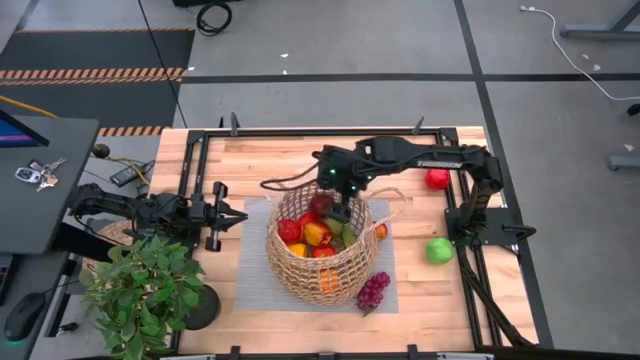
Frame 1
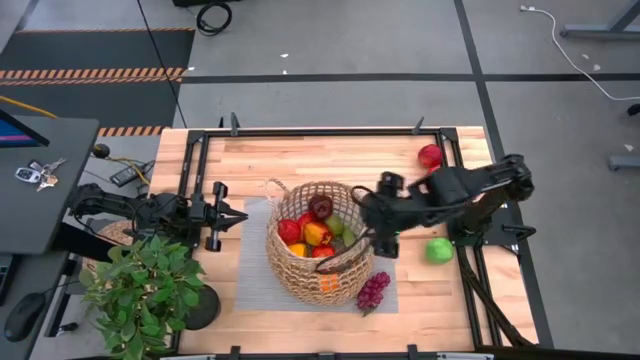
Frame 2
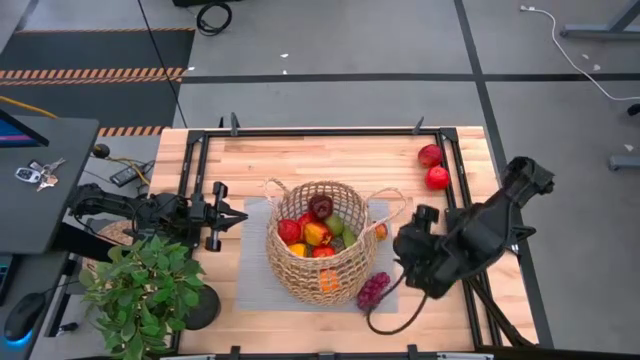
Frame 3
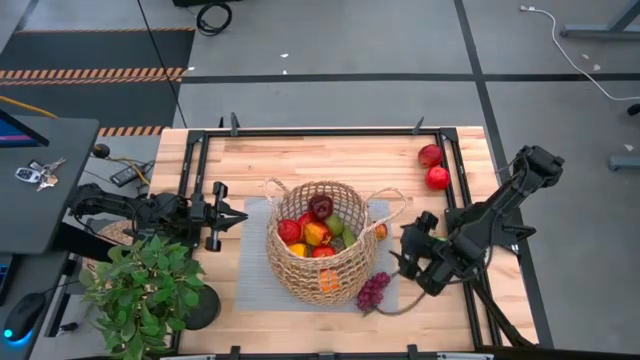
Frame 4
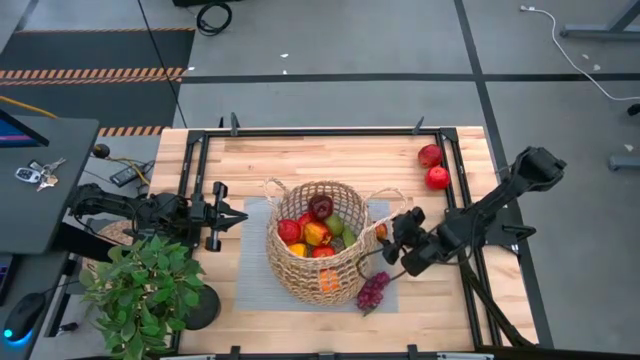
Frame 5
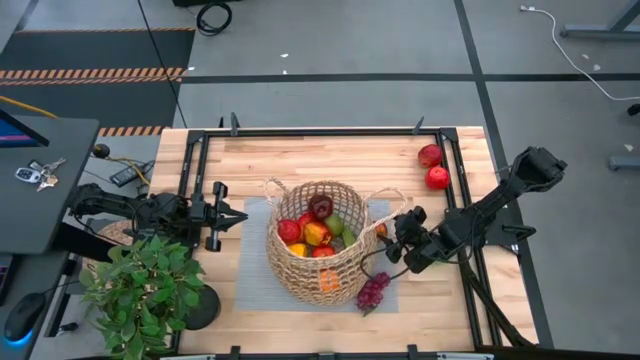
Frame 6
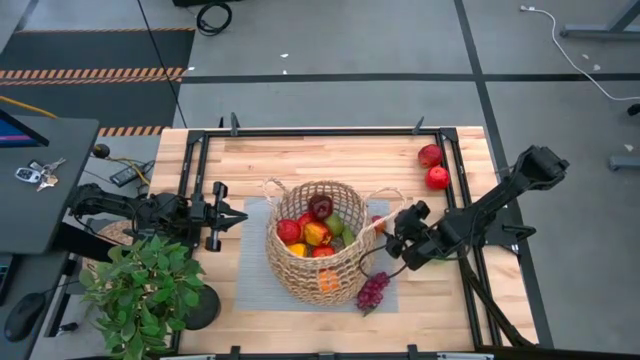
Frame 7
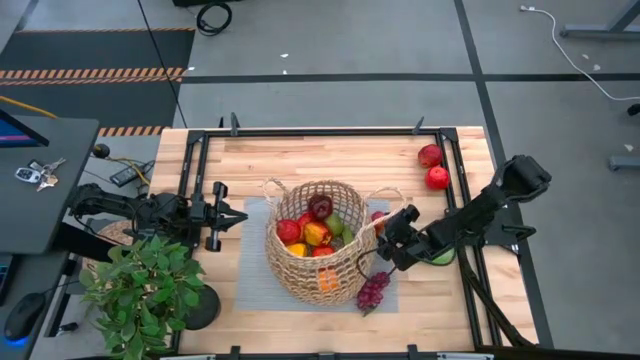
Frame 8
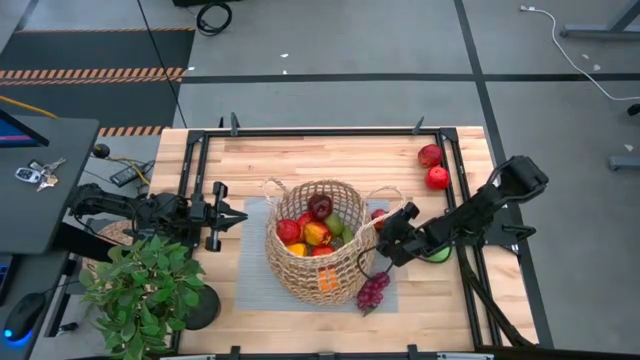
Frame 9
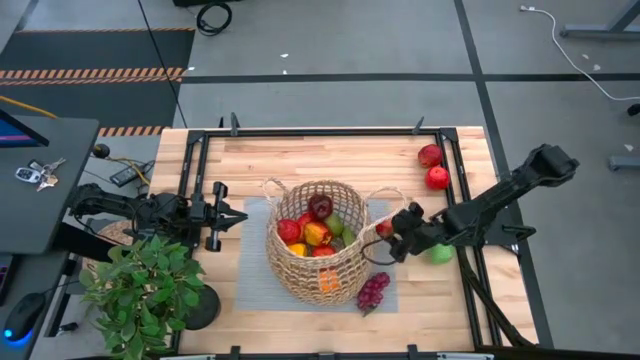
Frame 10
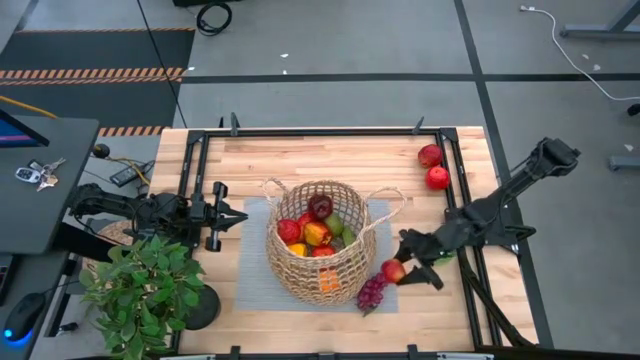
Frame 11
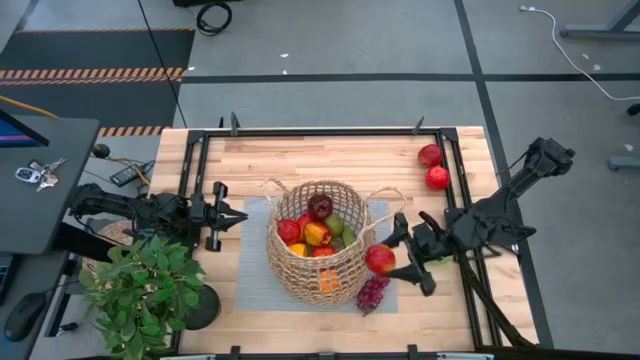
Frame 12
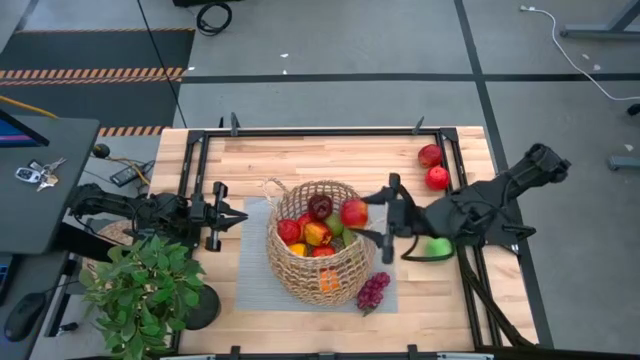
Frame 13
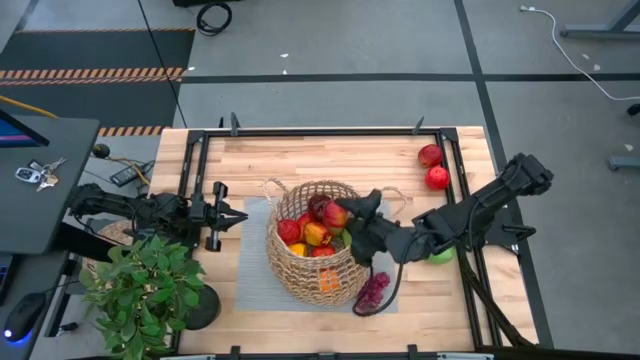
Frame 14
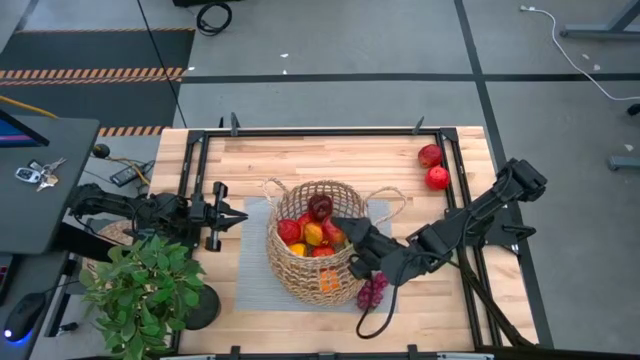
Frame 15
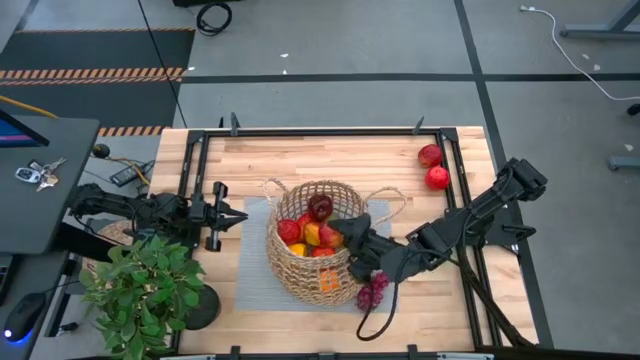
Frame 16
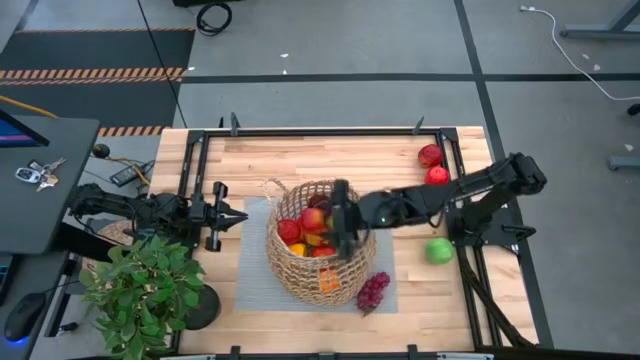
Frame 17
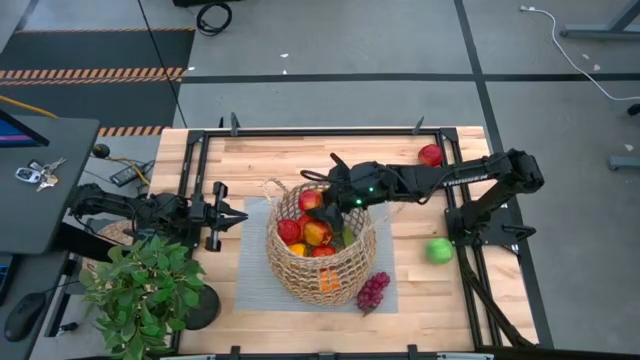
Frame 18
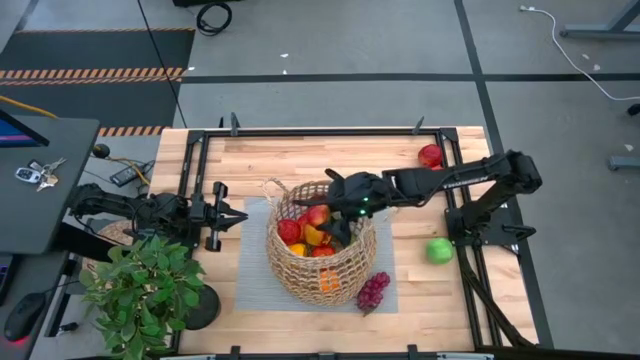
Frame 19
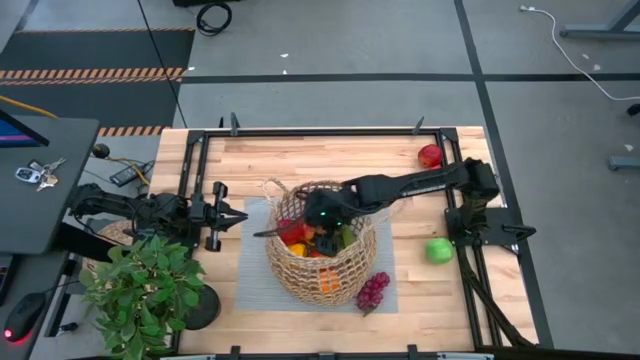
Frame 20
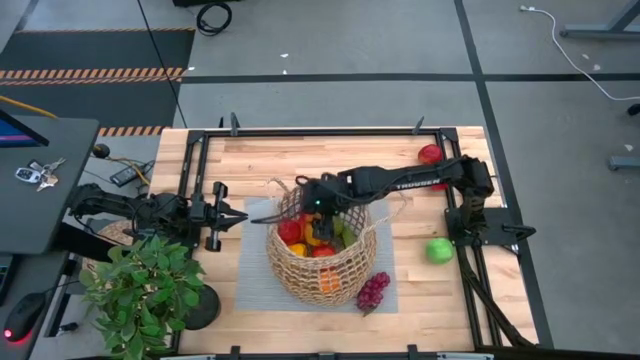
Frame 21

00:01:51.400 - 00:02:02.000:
Task: Build produce basket
Put the bottom red apple into the brown basket

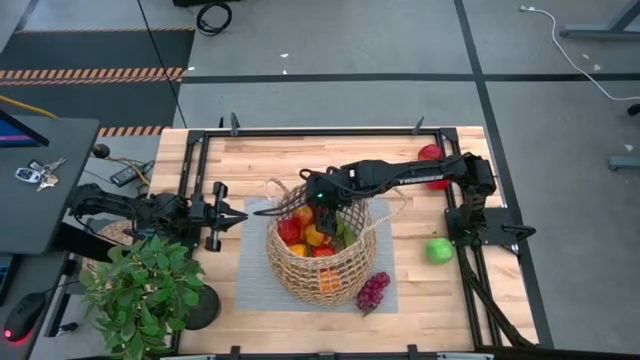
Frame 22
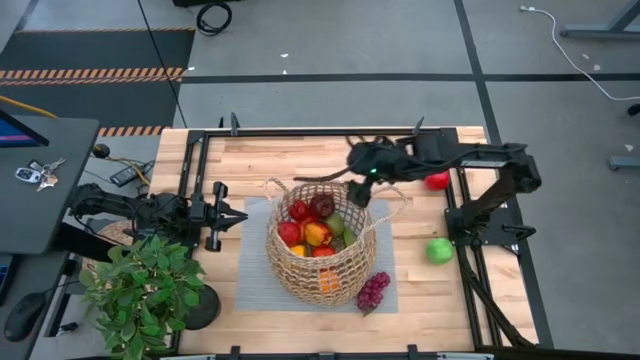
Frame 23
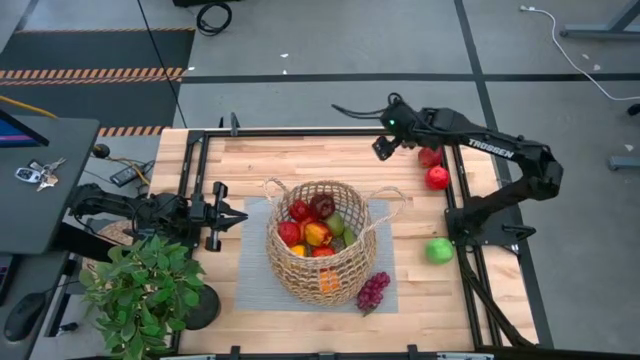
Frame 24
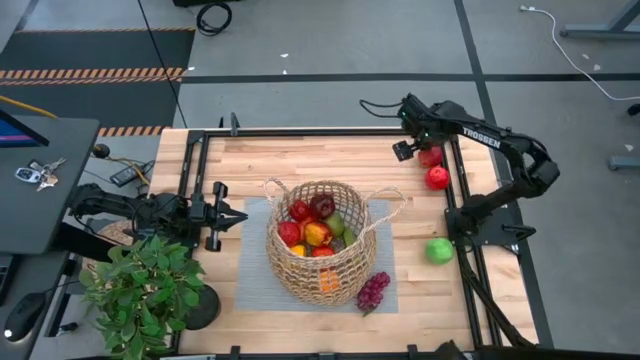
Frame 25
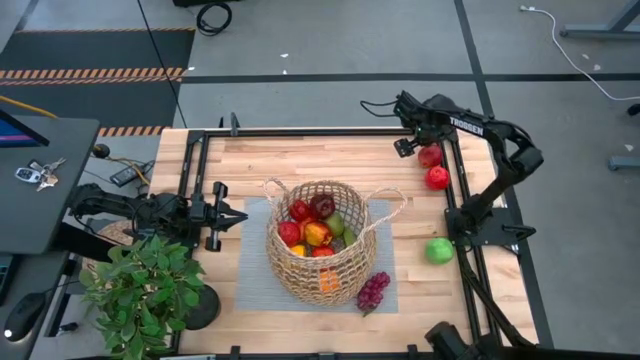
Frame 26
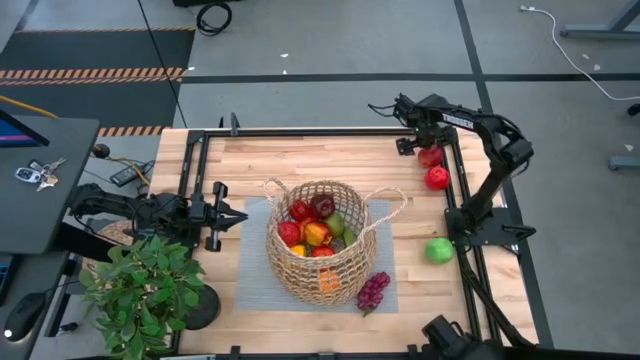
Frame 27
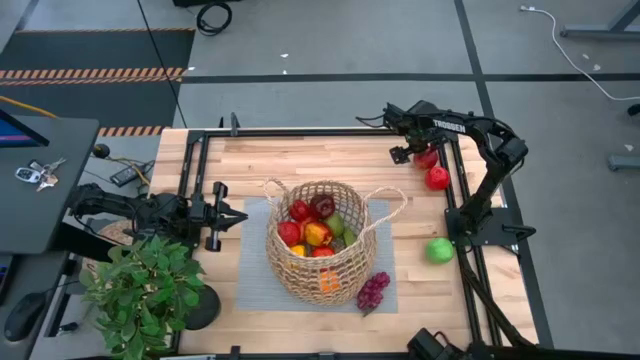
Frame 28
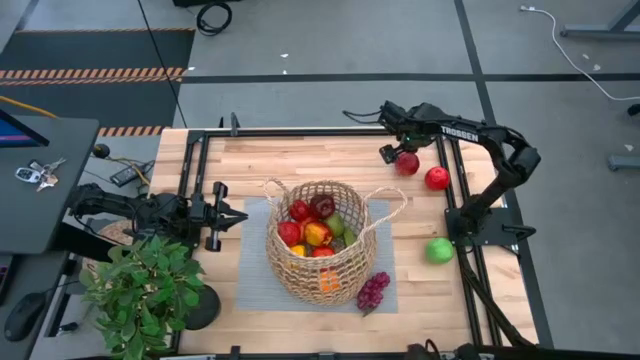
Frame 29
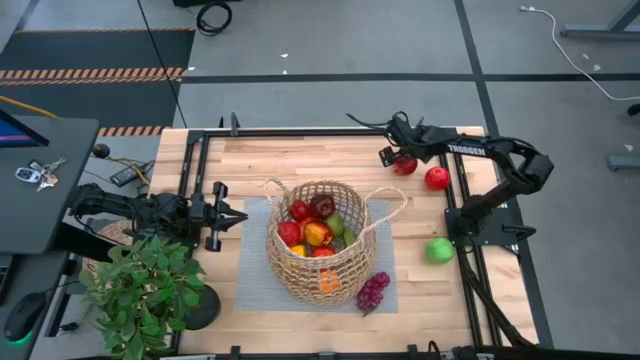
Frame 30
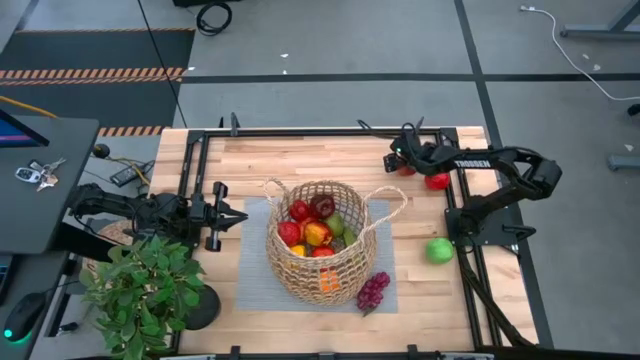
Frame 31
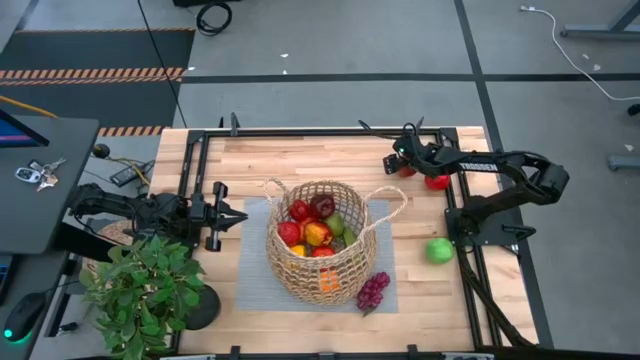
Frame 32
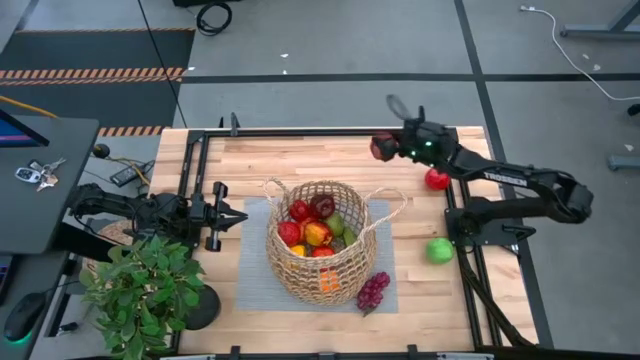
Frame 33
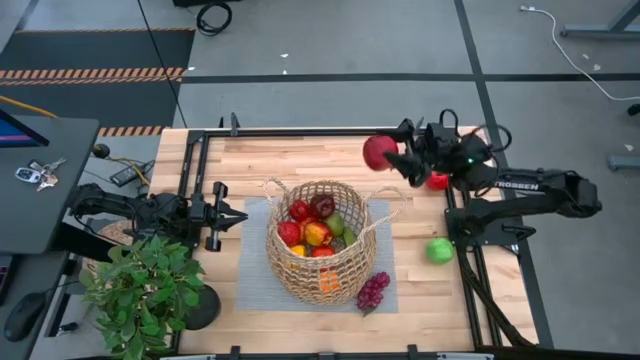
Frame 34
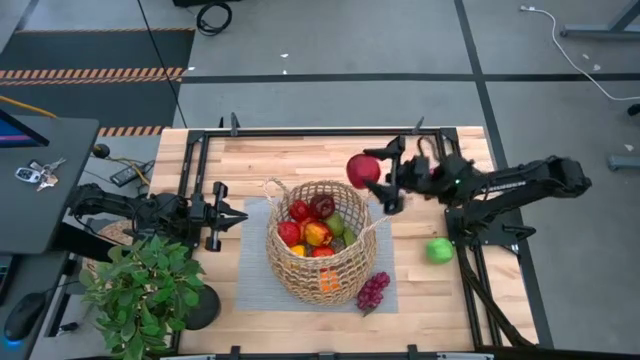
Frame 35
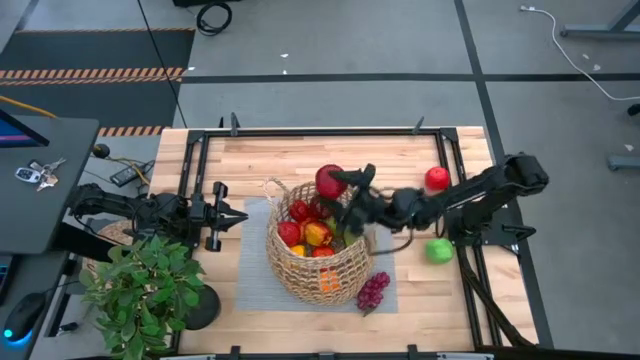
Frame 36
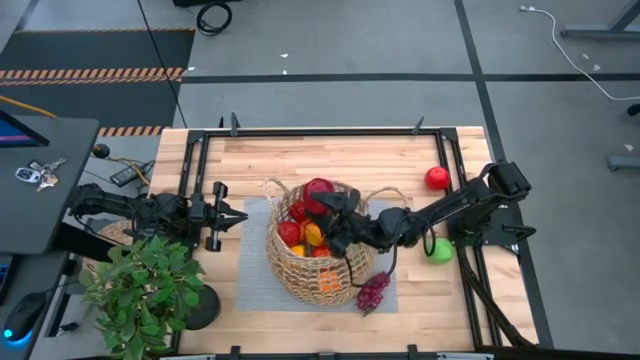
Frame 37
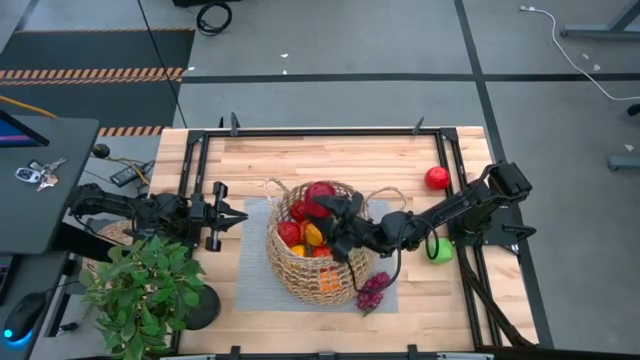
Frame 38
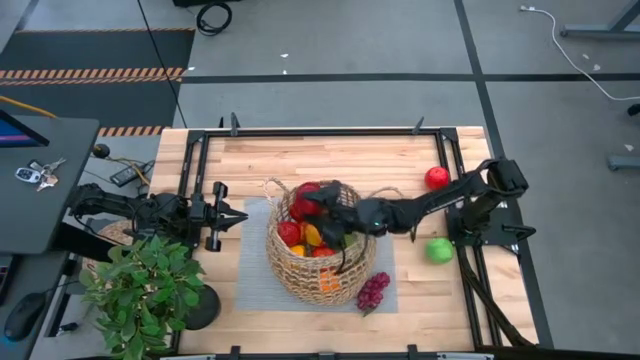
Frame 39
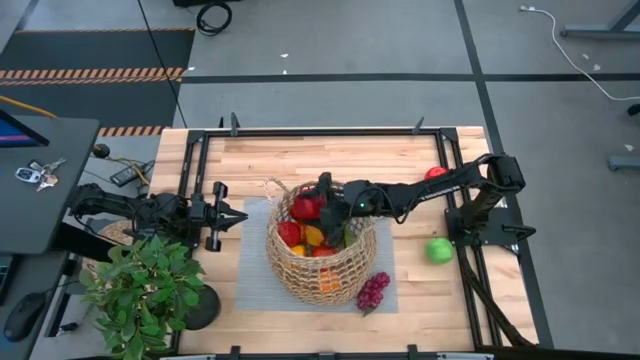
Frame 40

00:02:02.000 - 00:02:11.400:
Put the red pomegranate into the brown basket

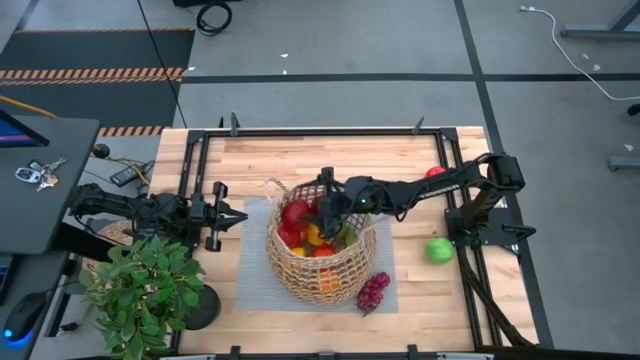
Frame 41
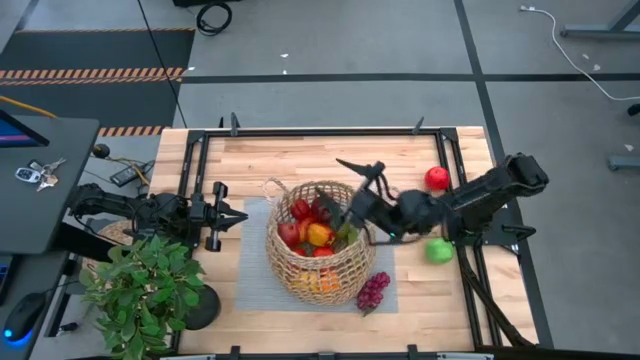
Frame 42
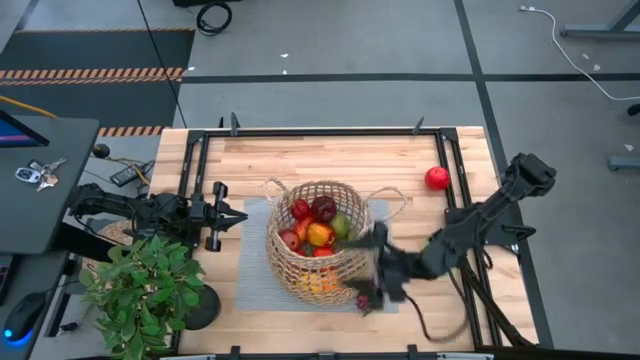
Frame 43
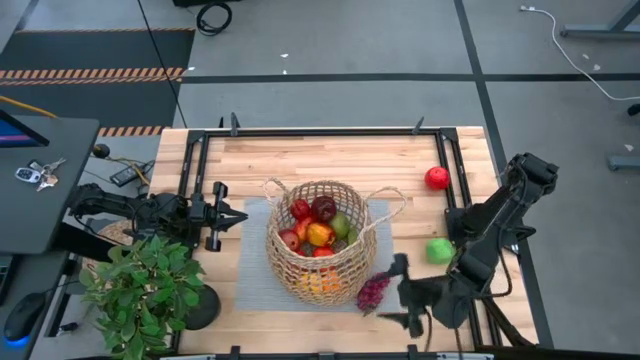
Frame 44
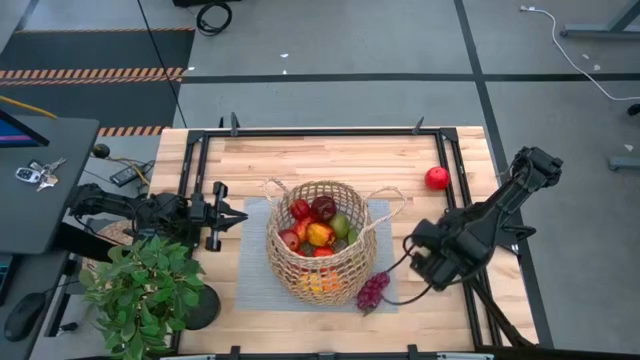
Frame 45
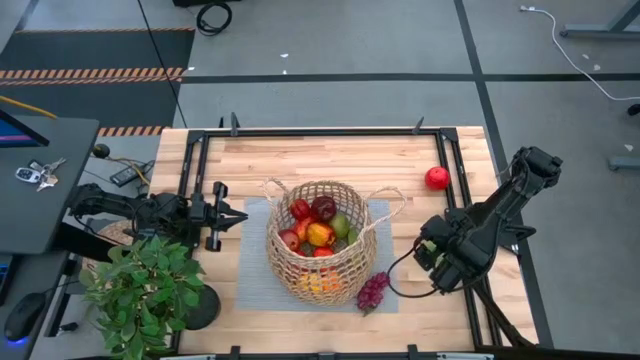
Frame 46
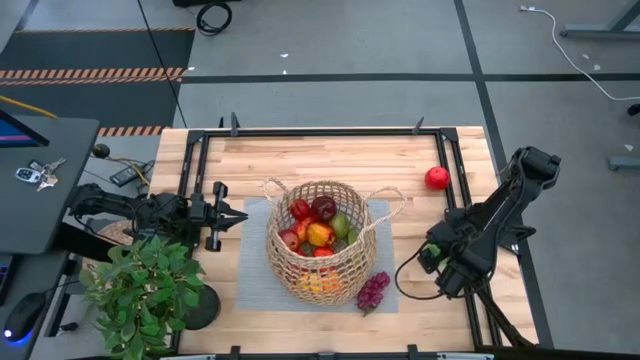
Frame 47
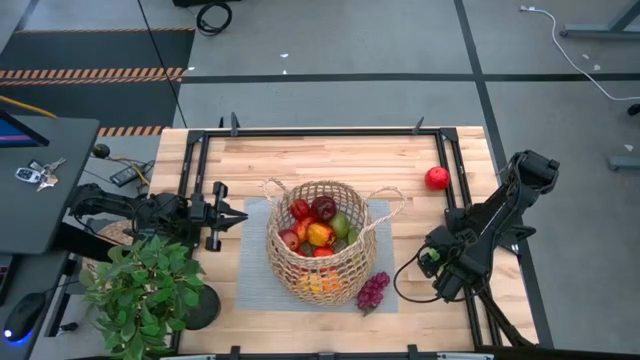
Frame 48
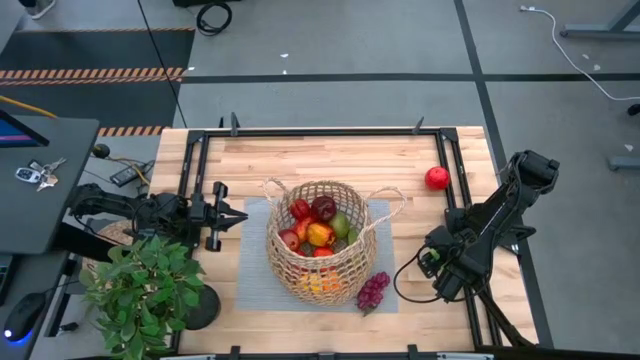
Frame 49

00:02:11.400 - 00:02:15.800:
Put the green apple into the brown basket
